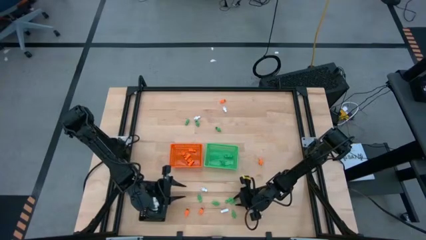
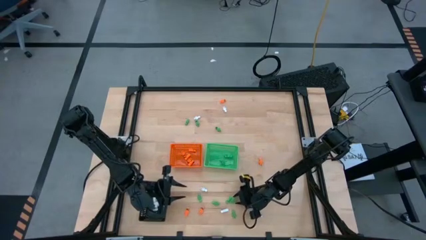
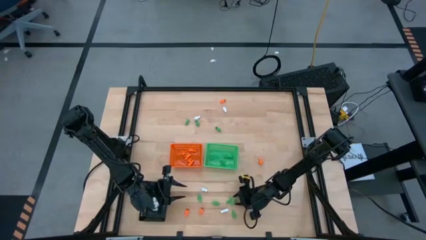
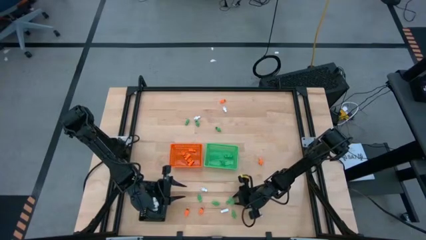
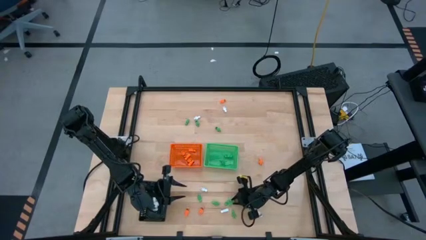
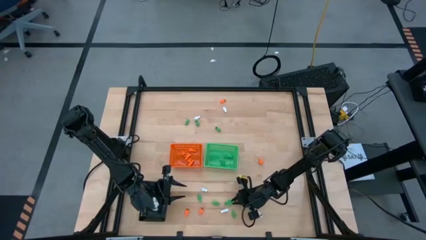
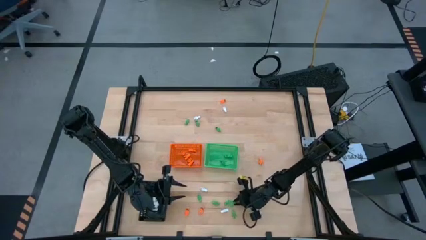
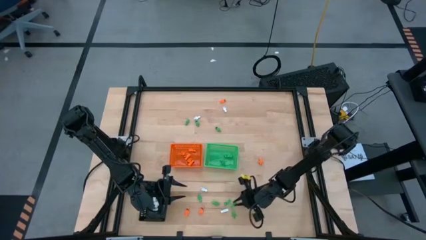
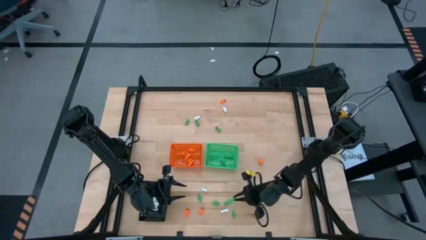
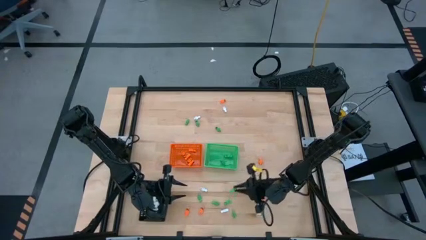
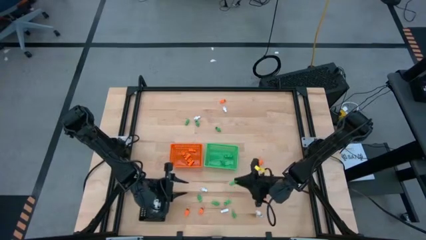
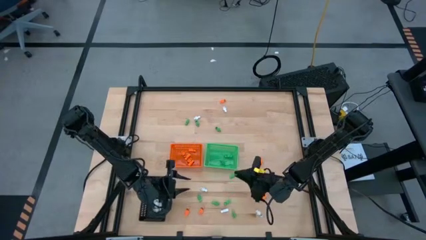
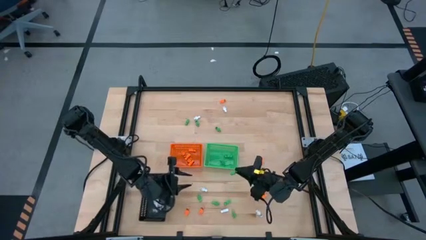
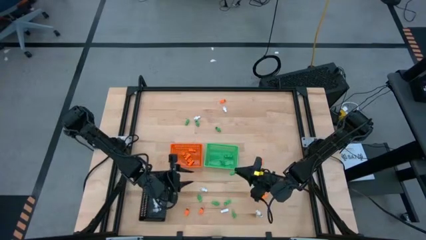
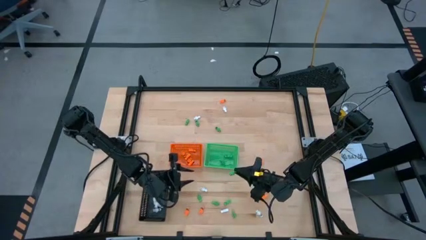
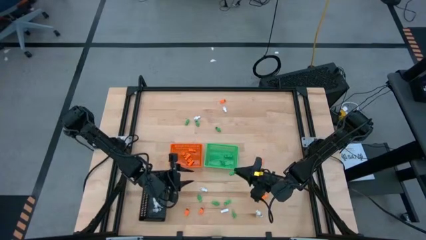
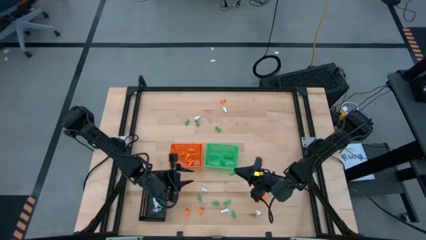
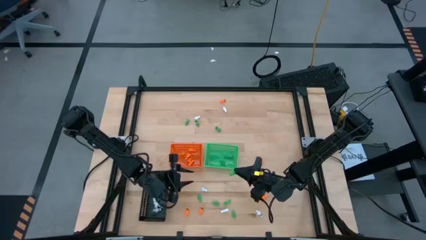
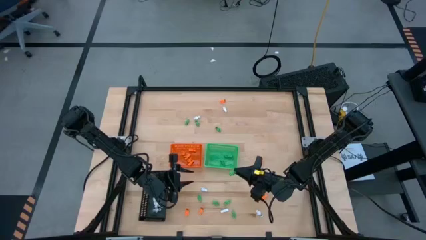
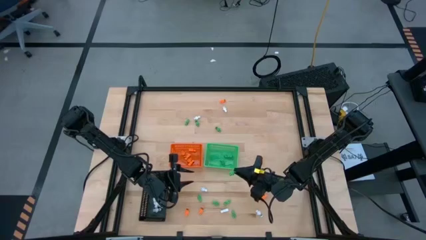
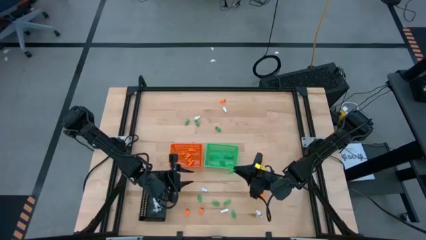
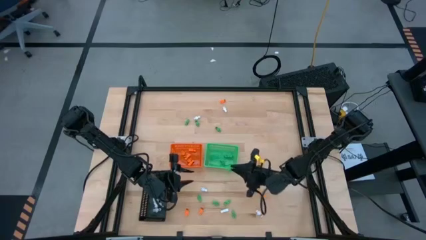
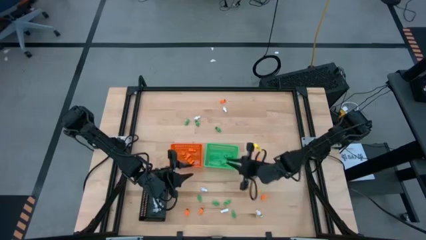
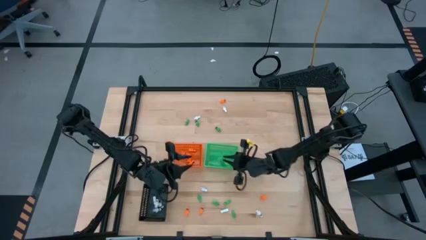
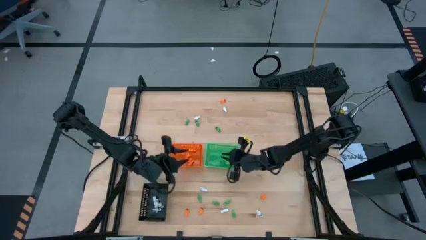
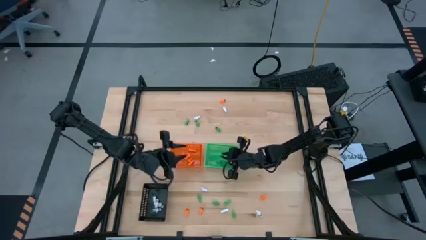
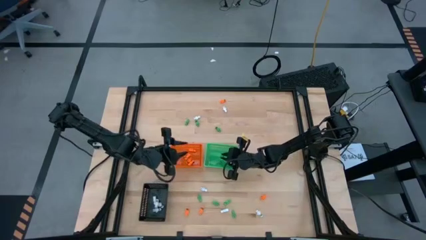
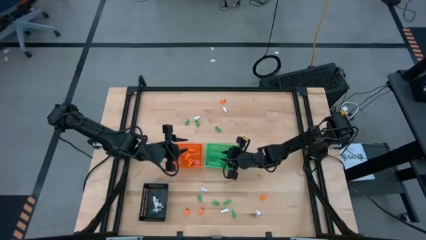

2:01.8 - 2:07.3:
Task: Sort Halloween decoration
Put the green skeleton toy into the green bin

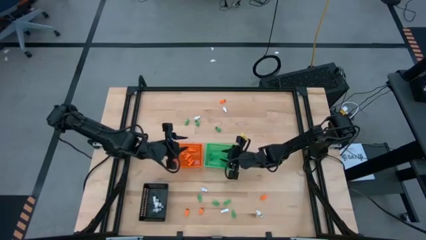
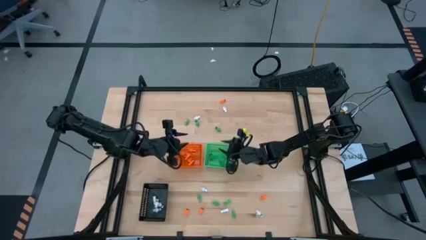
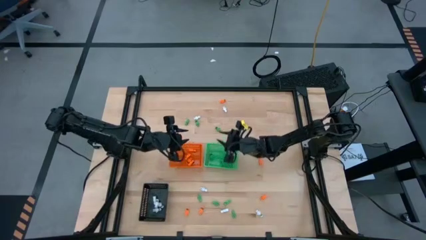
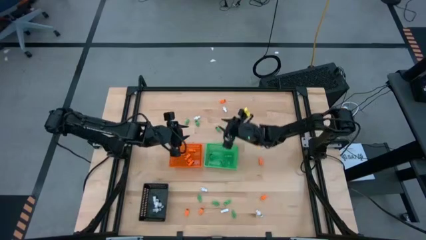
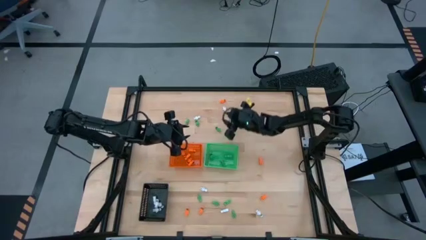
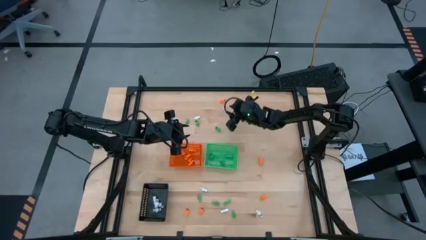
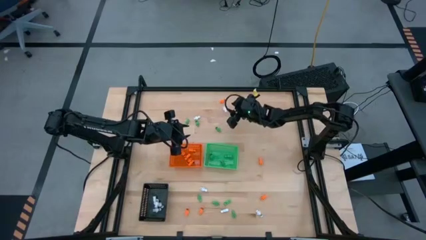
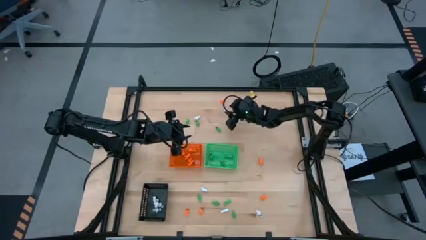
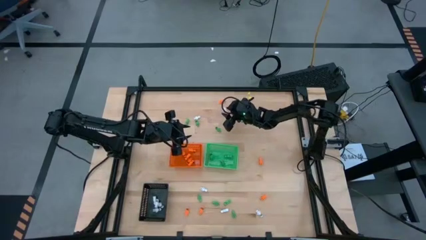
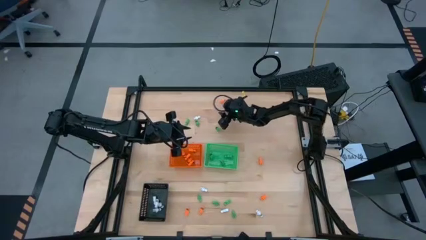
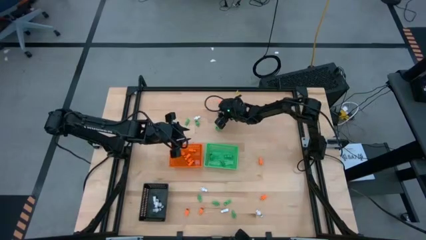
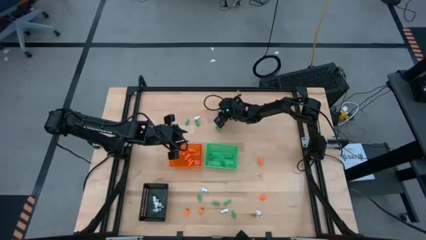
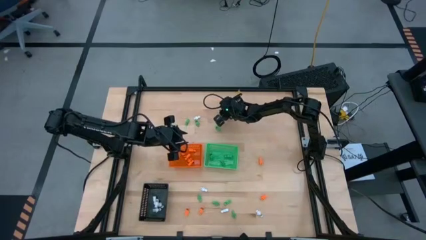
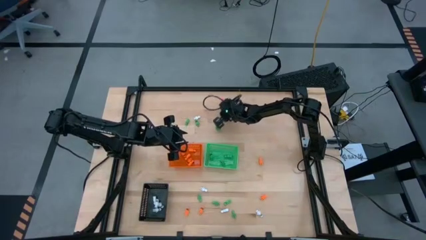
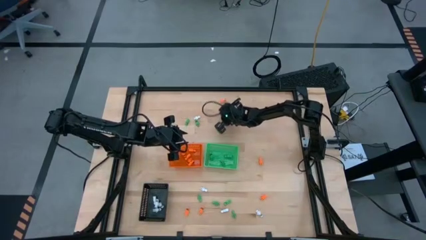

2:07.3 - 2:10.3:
Put the white skeleton toy into the black bin

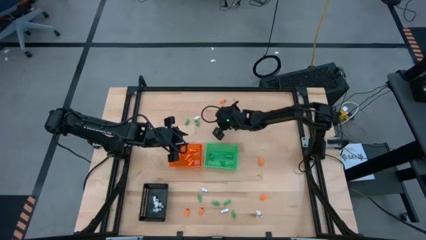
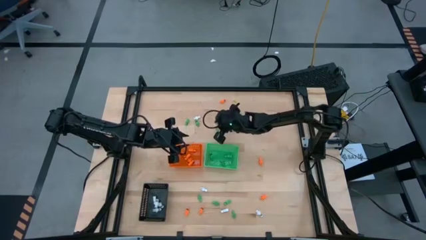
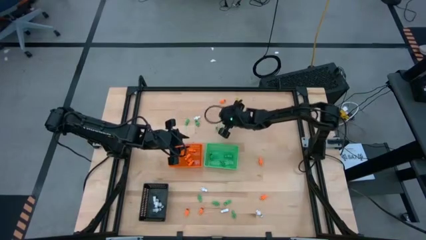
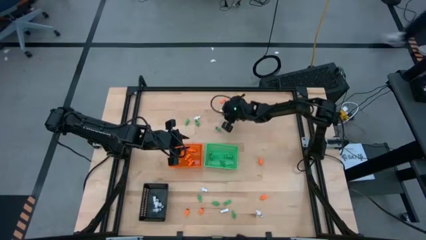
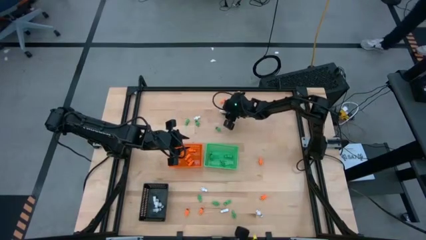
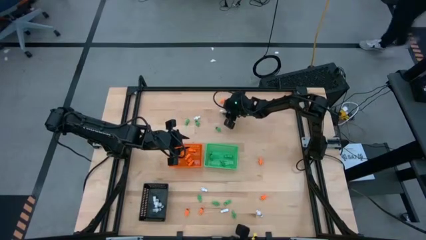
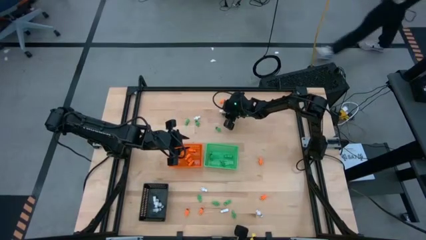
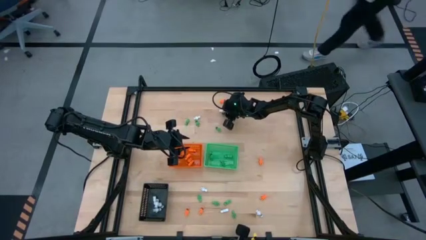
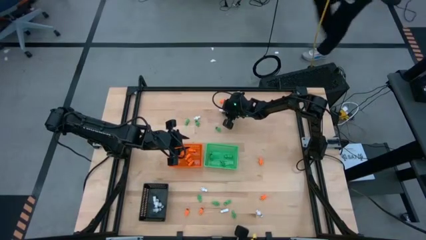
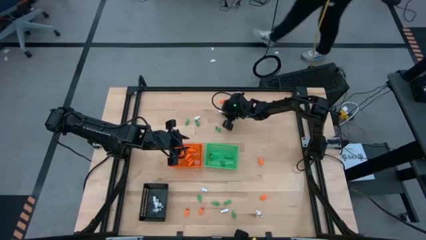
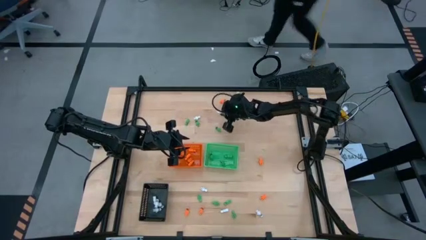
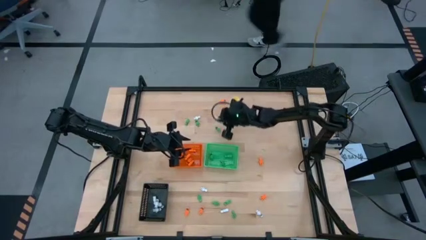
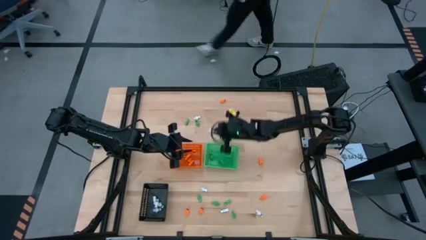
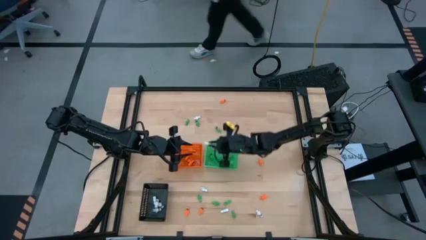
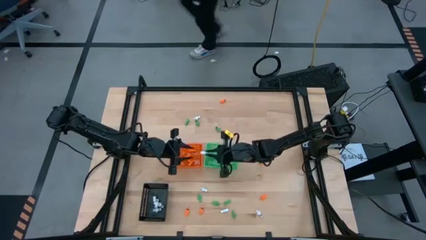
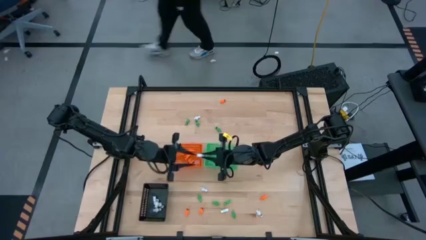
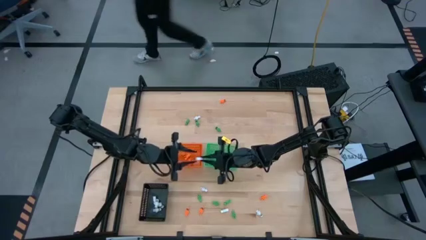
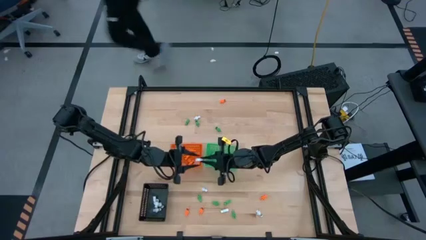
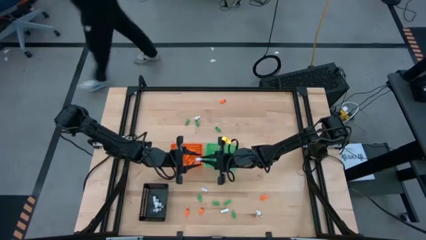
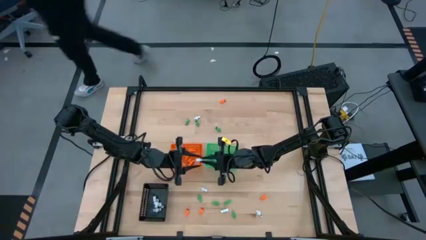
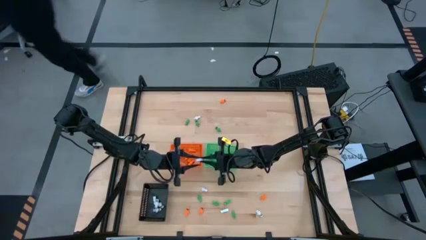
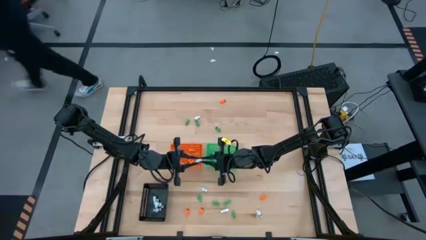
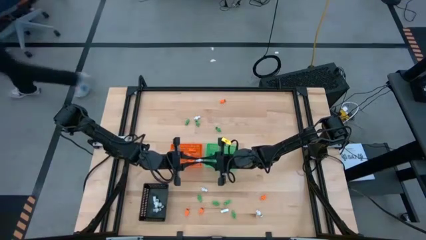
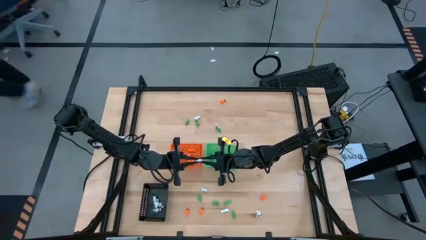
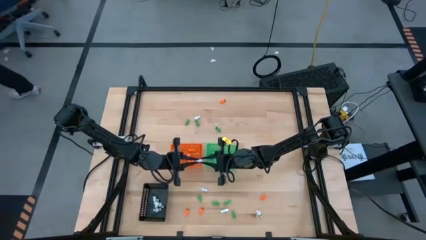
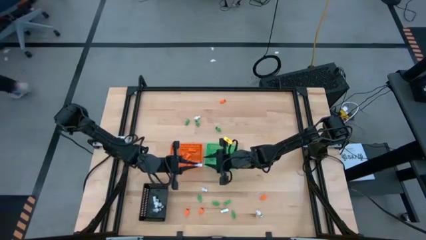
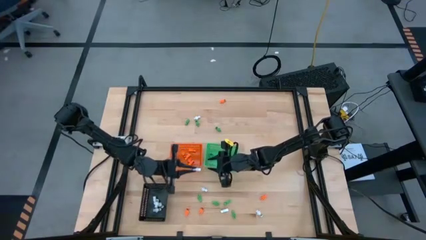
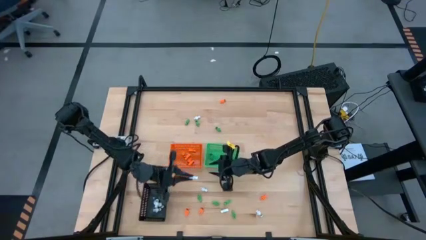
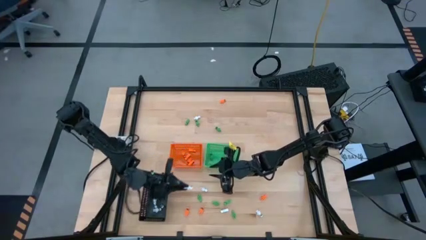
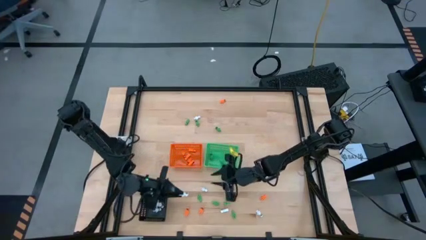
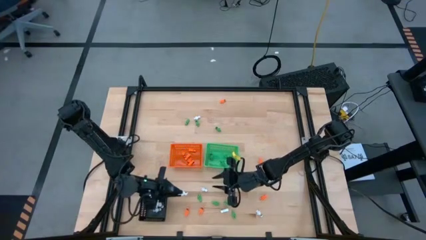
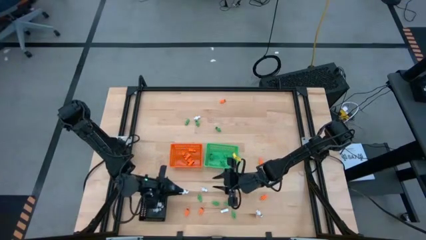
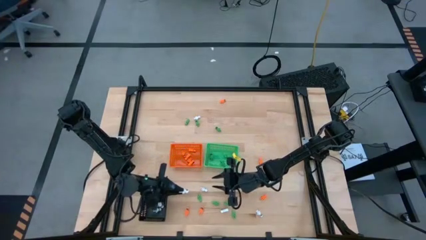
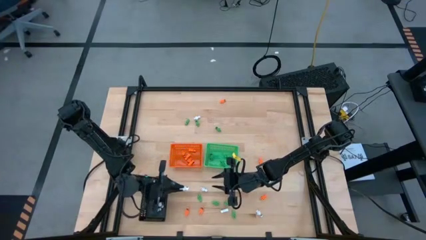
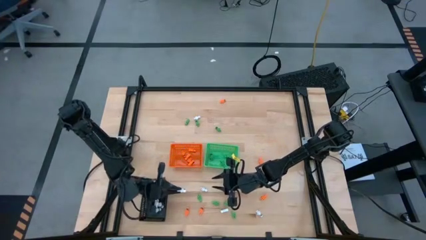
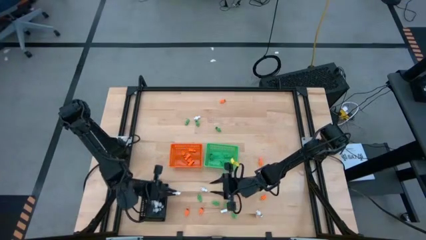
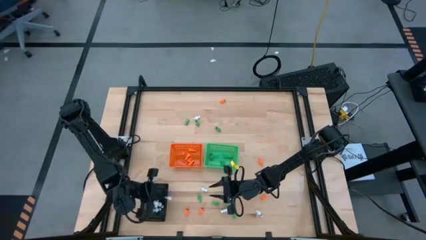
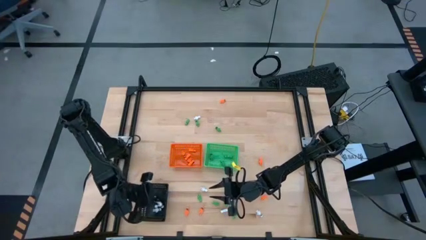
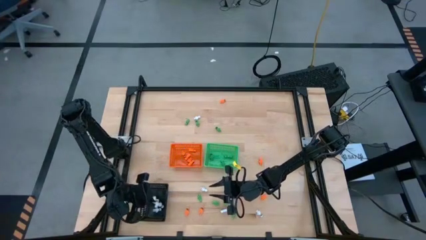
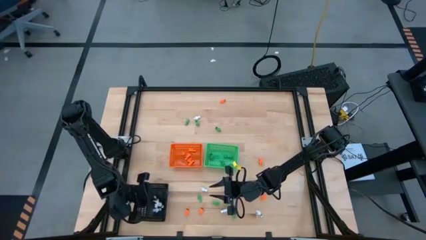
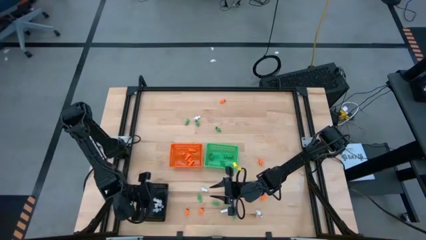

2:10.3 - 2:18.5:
Put the white skeleton toy into the black bin
